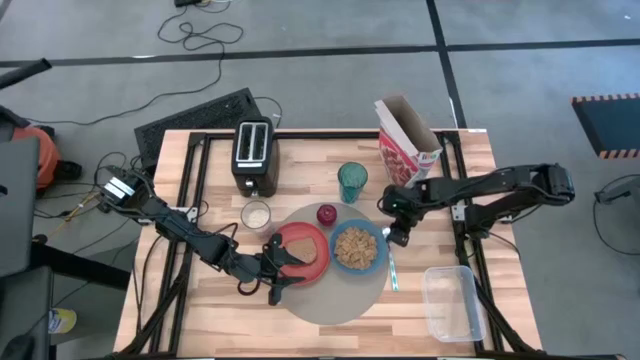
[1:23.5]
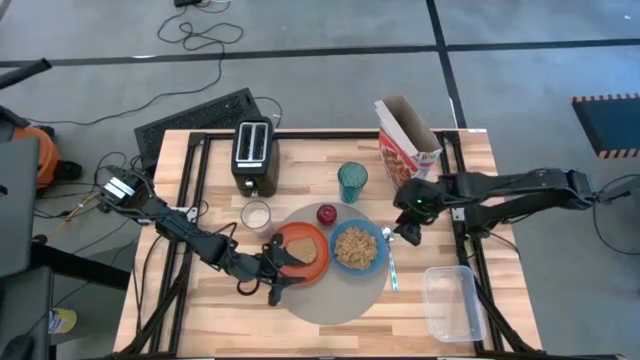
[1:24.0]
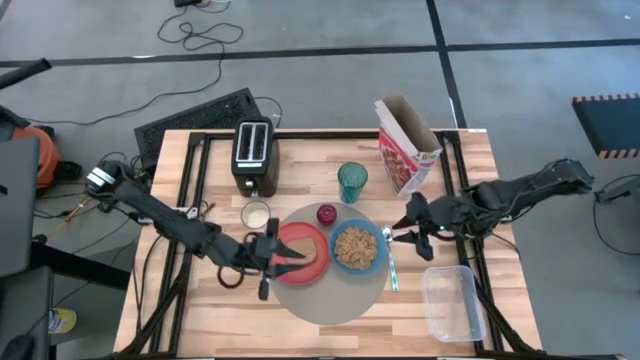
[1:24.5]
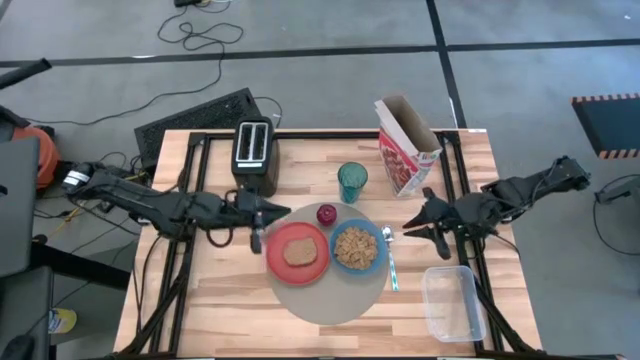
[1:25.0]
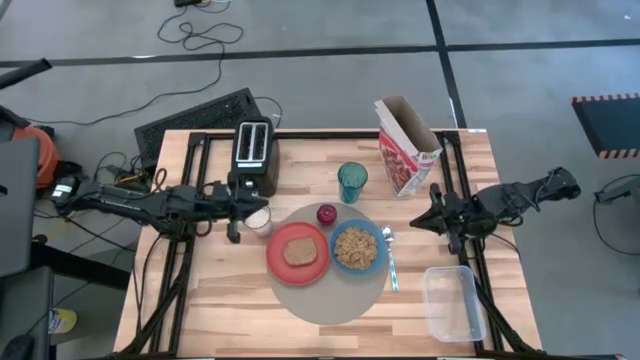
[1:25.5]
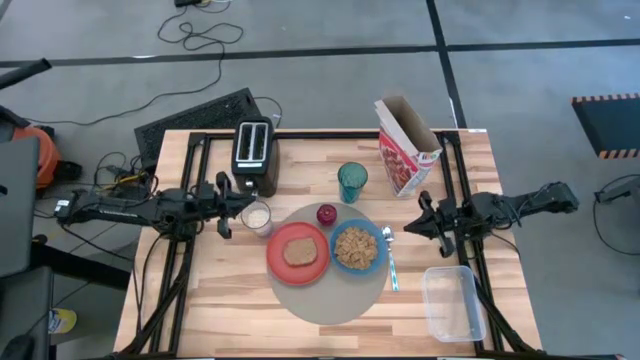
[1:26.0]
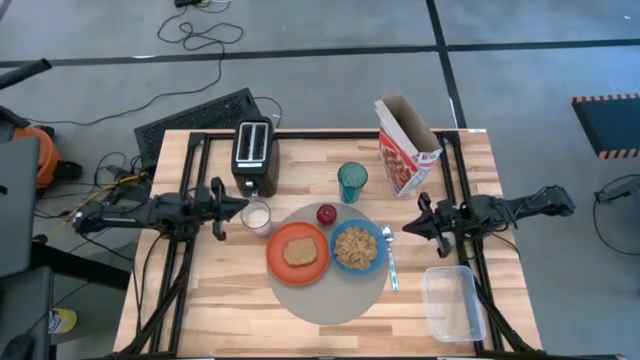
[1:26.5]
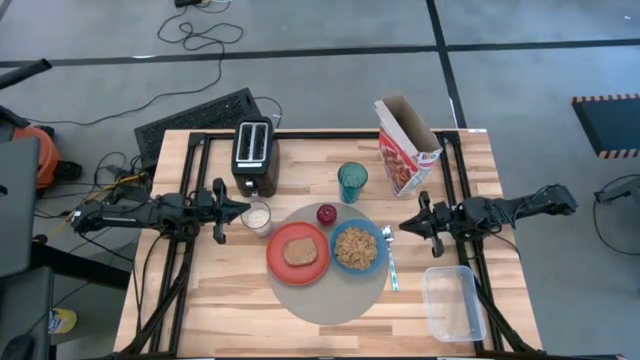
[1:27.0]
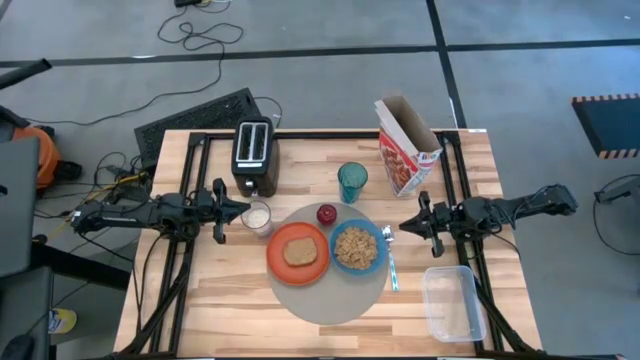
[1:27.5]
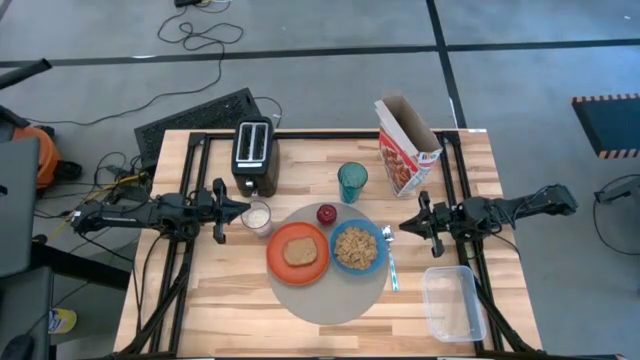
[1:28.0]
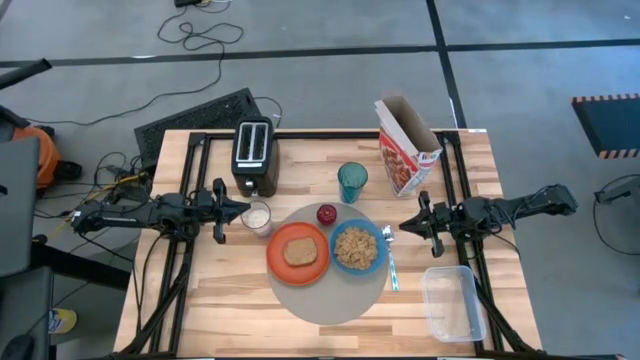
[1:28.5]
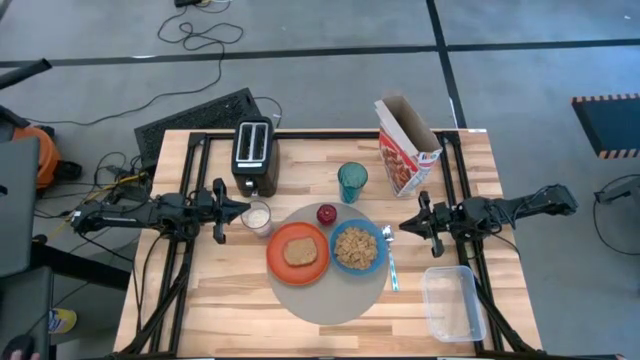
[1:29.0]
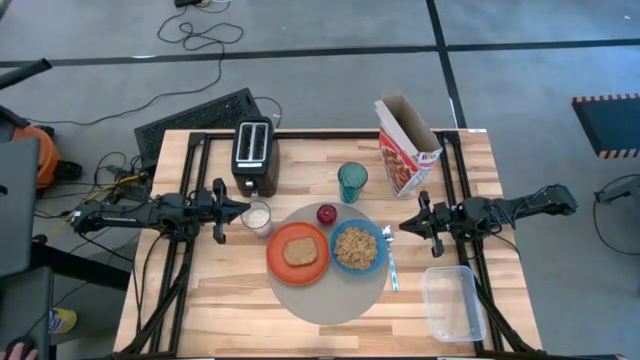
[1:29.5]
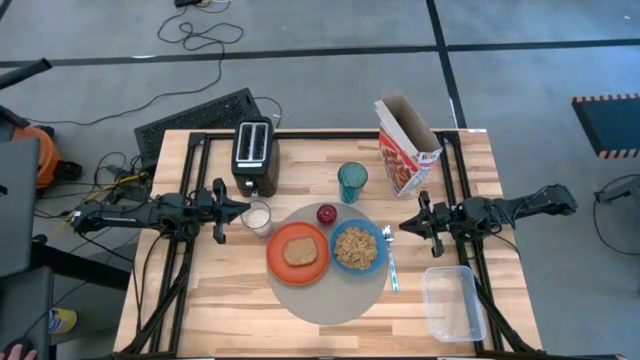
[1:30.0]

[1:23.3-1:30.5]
Task: Arrange a breakfast setting
Return to Home Position

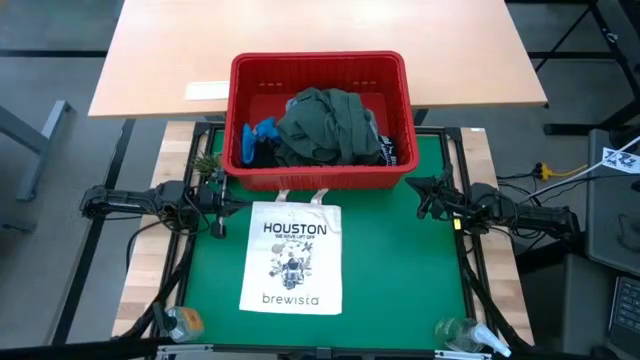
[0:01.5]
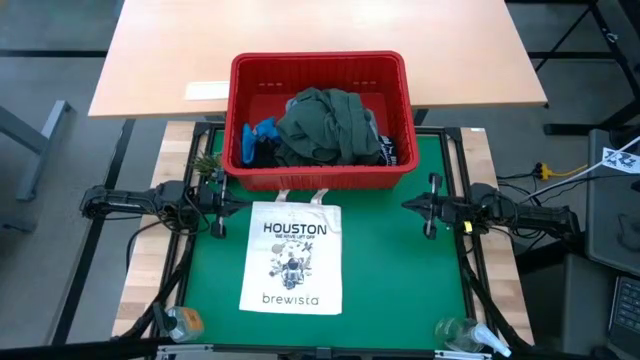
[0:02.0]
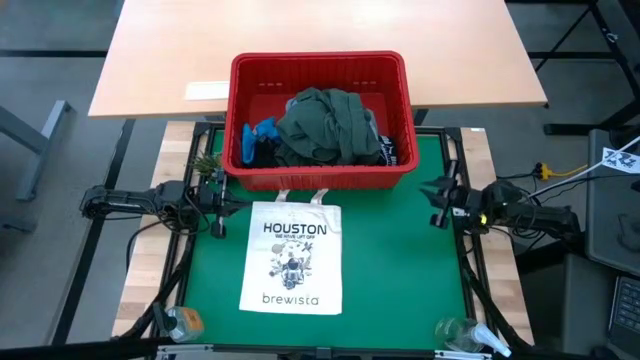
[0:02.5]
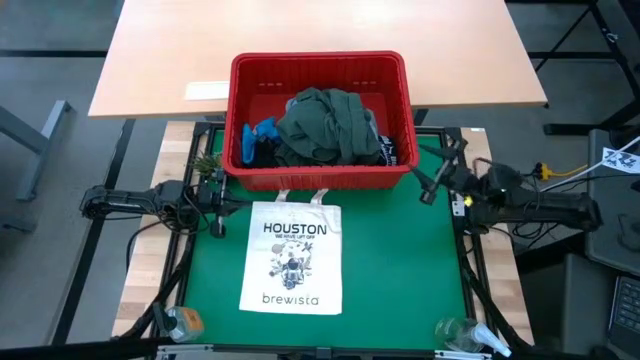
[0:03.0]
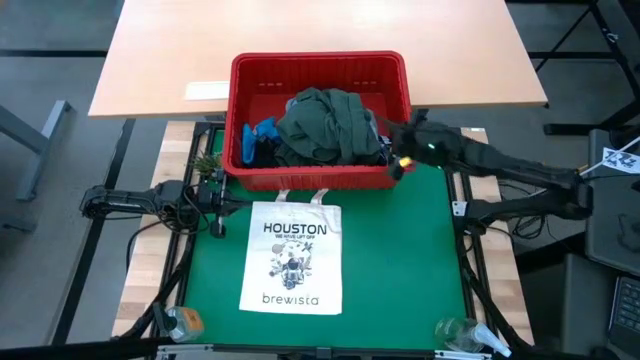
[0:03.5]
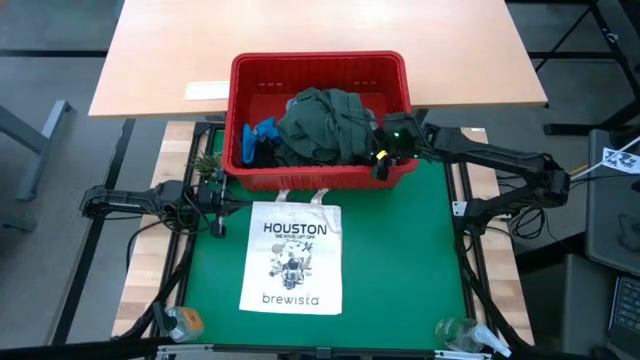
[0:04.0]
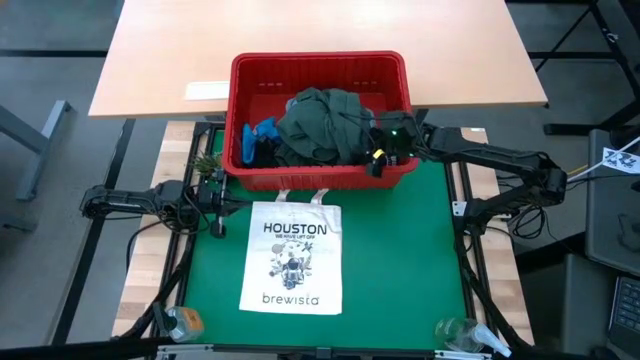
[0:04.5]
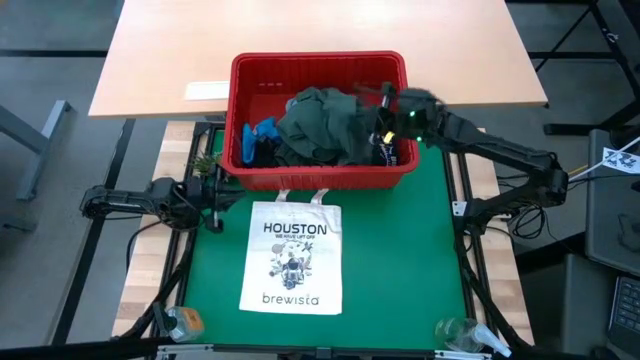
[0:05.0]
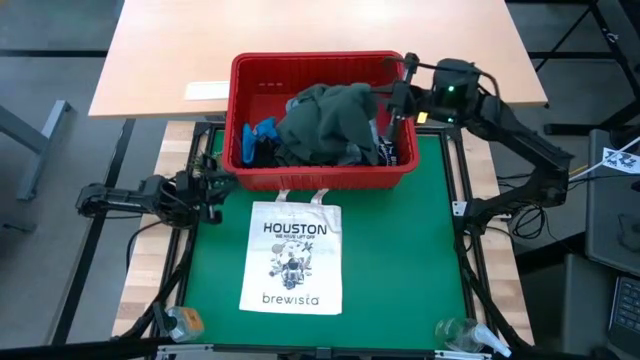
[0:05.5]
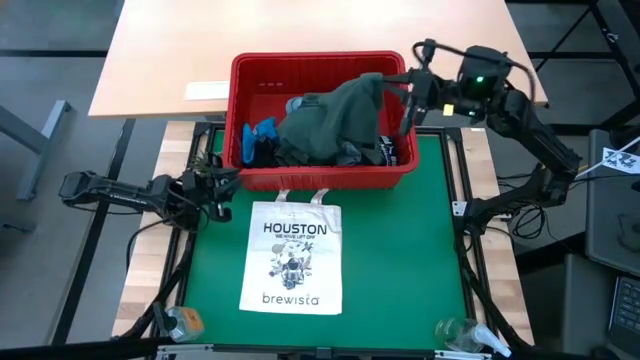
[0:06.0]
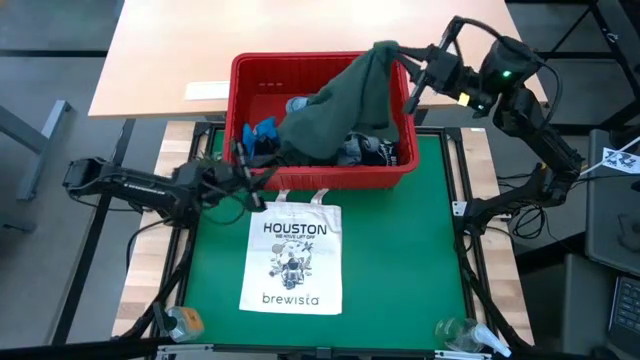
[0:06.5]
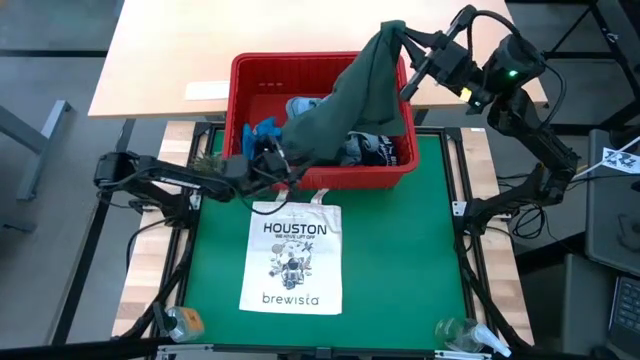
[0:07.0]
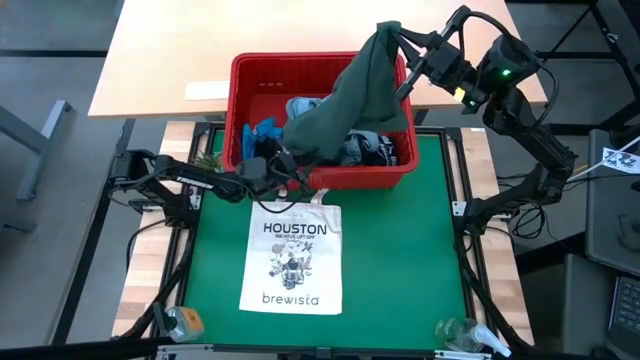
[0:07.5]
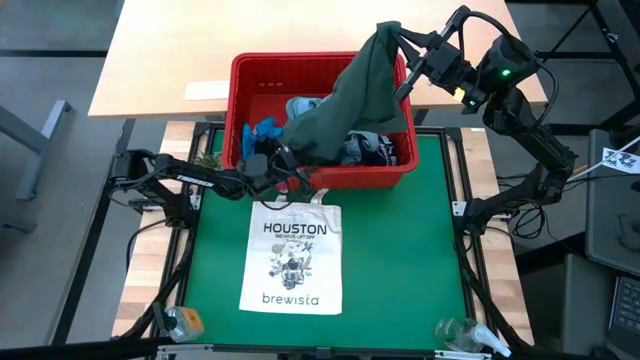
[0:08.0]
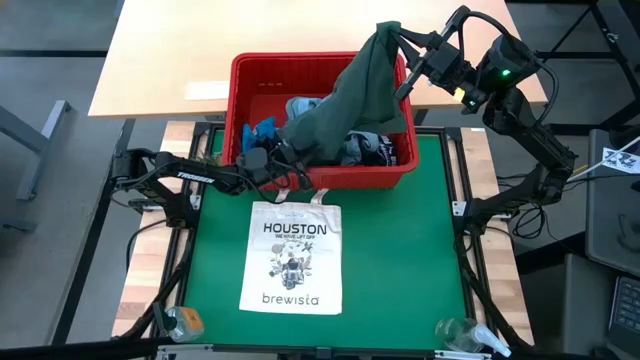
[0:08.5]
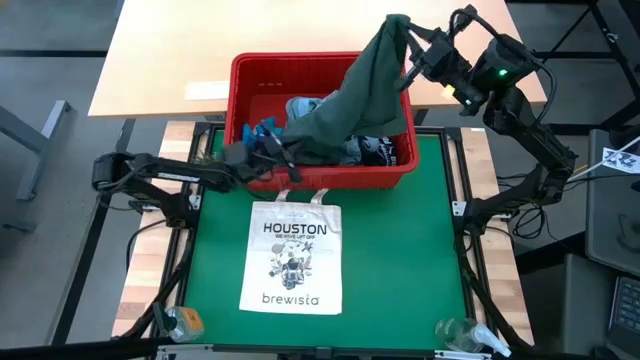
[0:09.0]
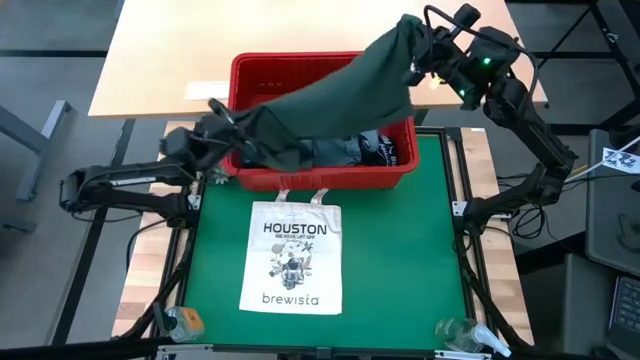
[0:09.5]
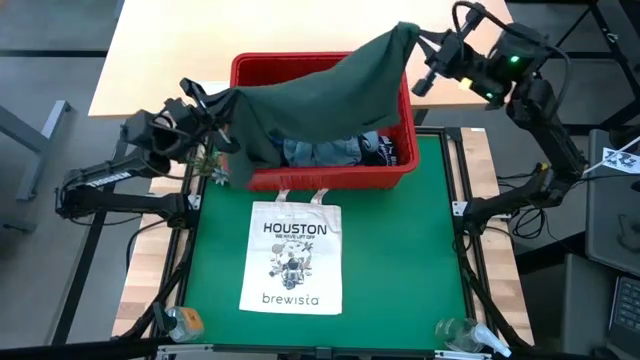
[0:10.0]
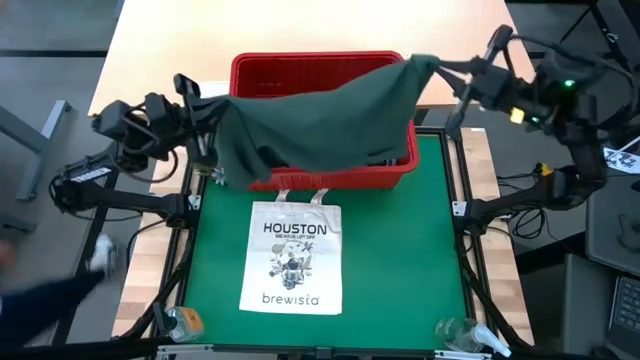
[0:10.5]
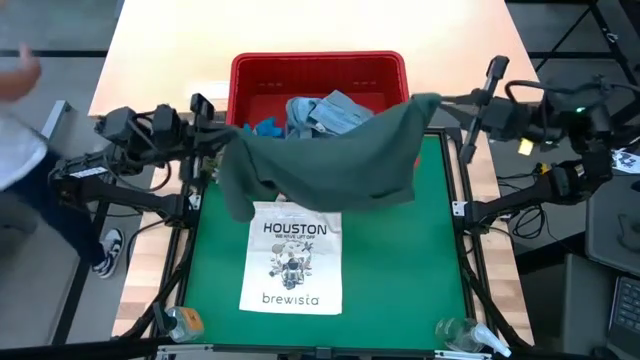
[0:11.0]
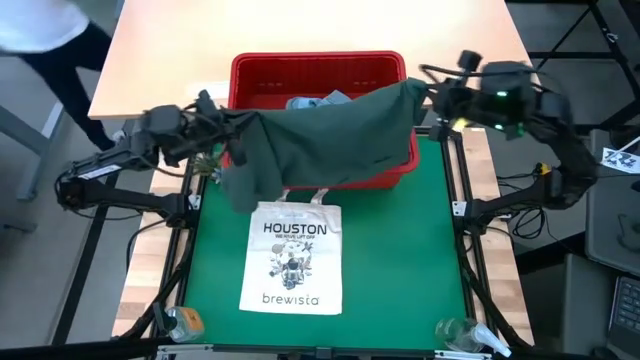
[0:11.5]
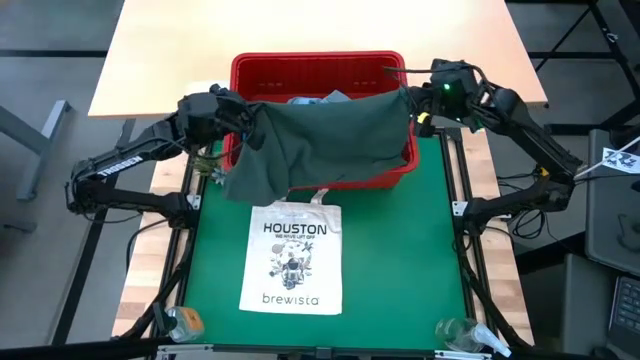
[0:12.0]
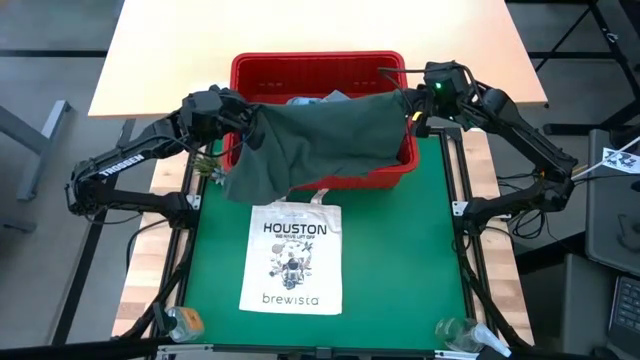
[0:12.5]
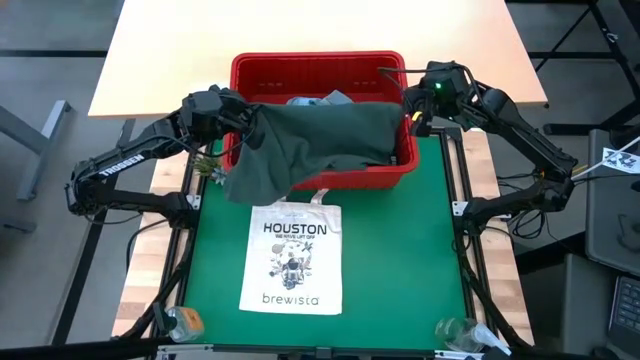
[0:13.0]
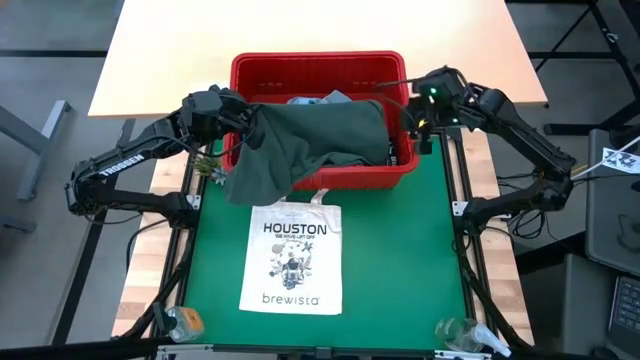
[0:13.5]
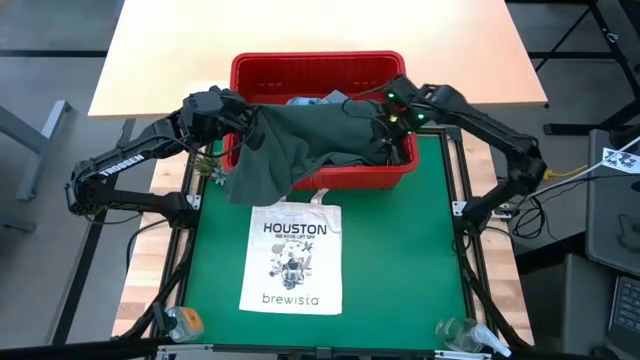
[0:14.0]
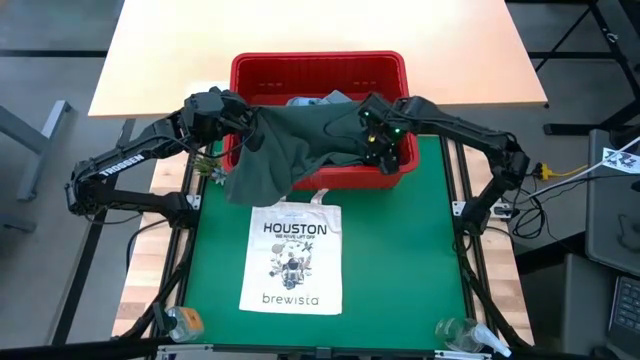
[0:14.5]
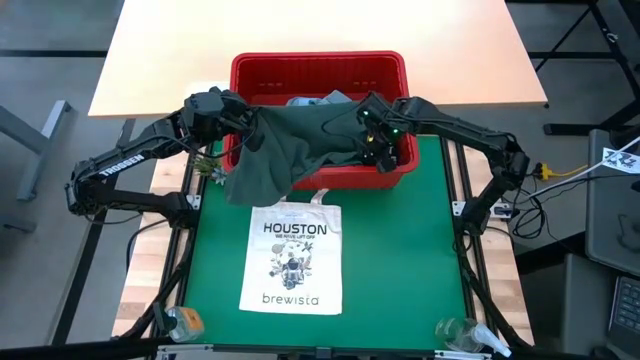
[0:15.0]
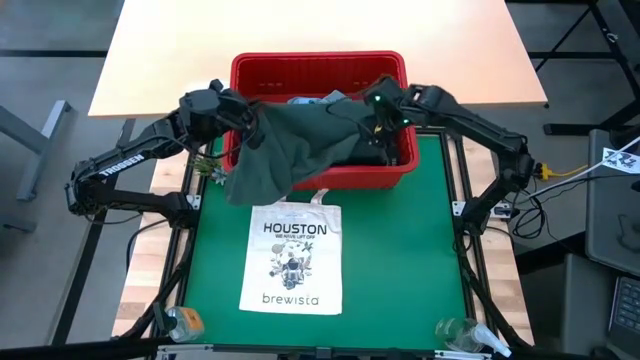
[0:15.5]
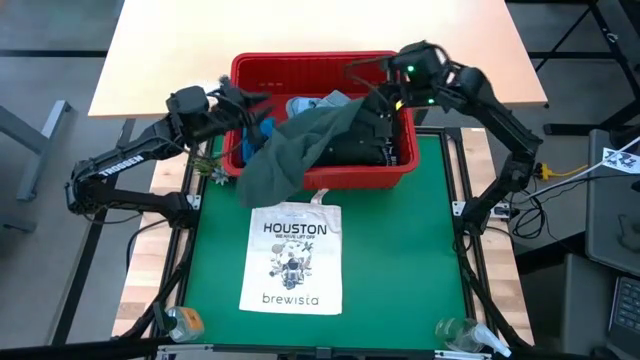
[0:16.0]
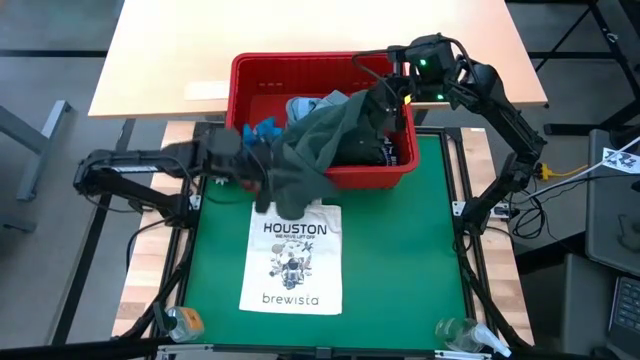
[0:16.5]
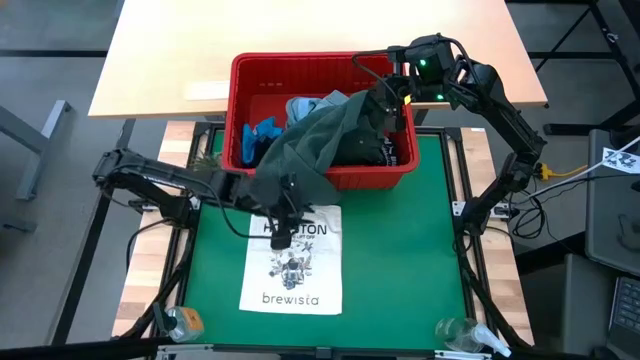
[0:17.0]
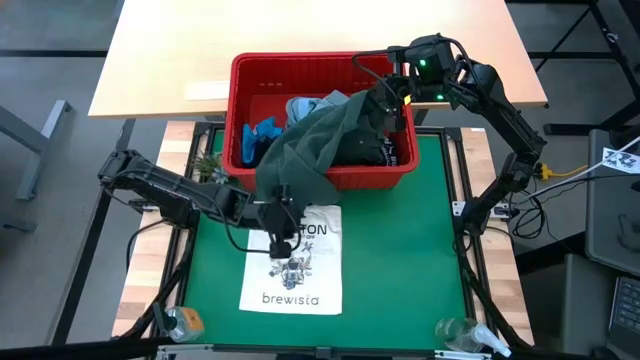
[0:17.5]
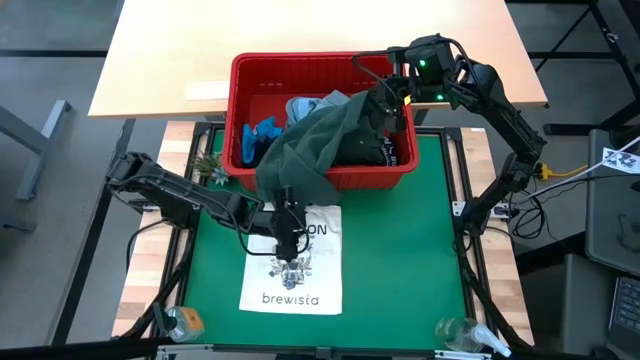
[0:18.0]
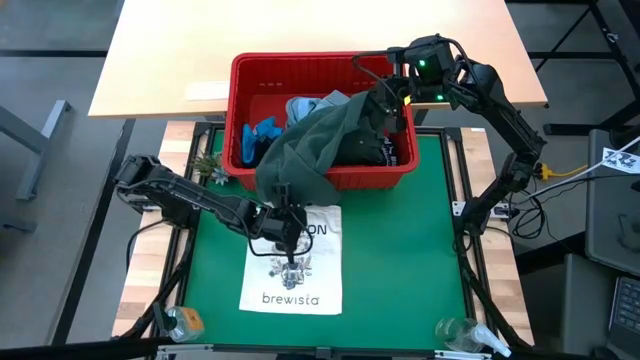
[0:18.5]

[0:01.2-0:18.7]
Task: Fold Laundry from Bin
Fold the green t-shirt
